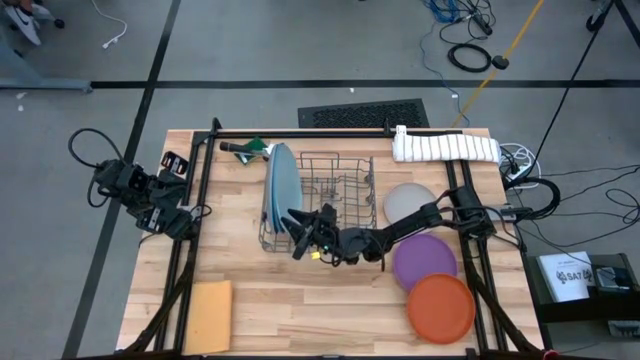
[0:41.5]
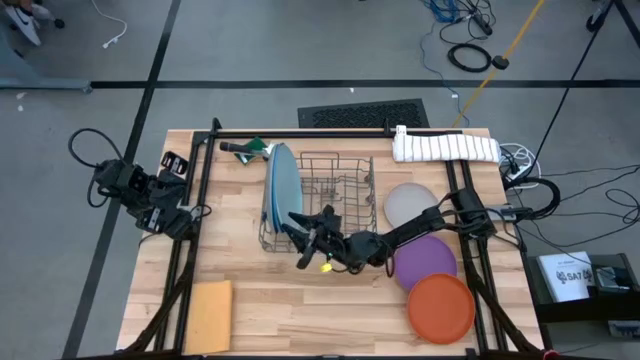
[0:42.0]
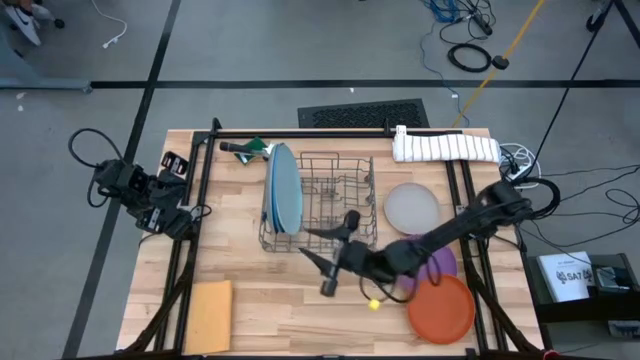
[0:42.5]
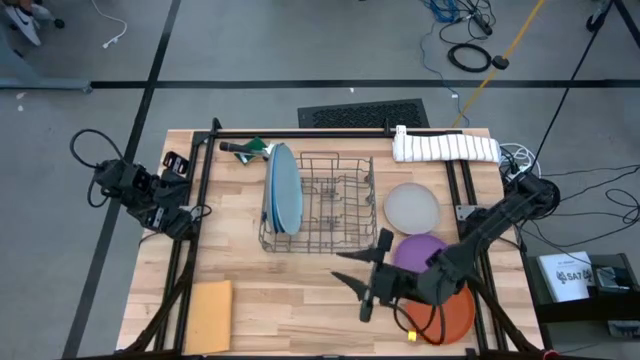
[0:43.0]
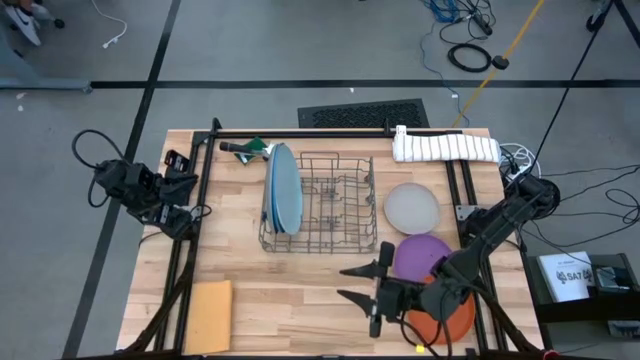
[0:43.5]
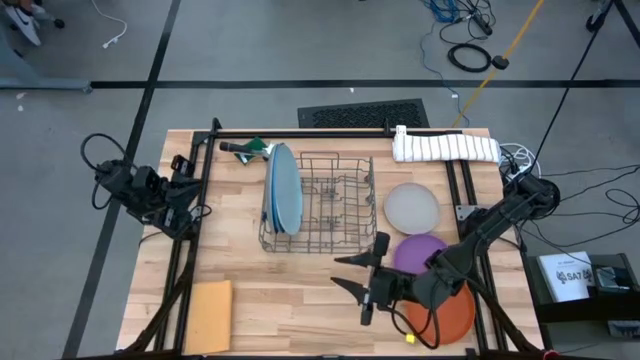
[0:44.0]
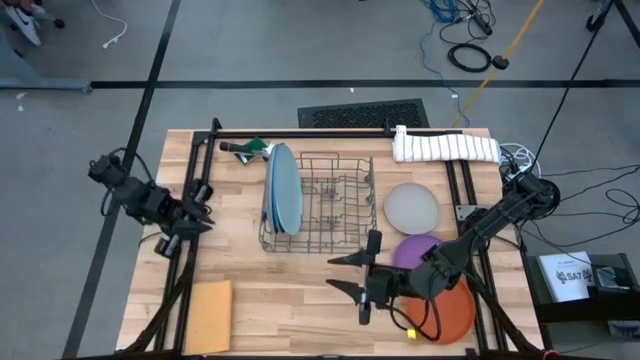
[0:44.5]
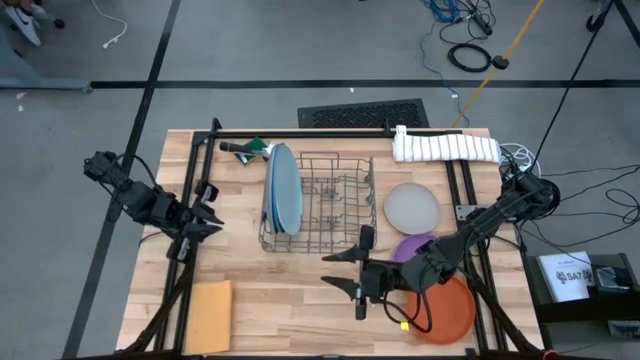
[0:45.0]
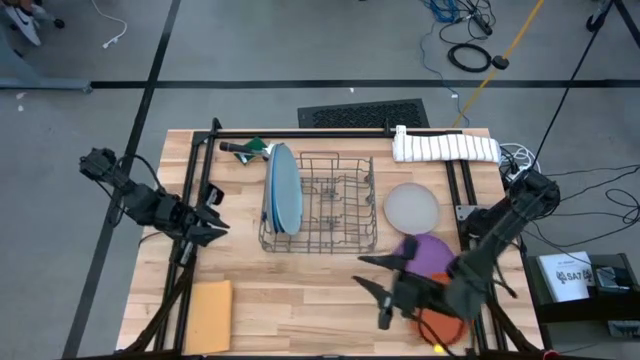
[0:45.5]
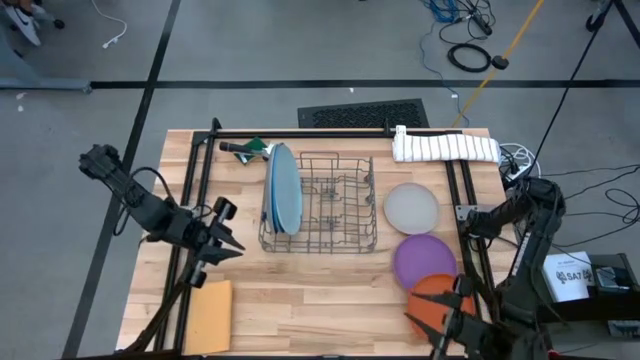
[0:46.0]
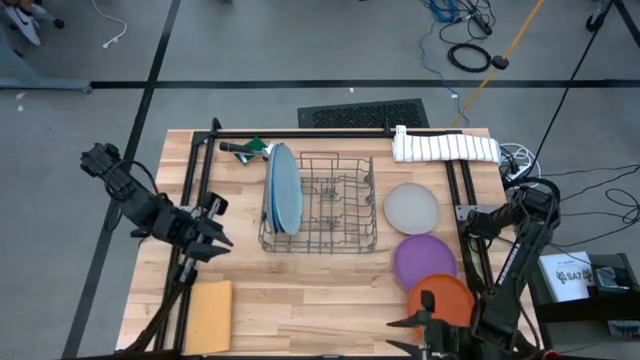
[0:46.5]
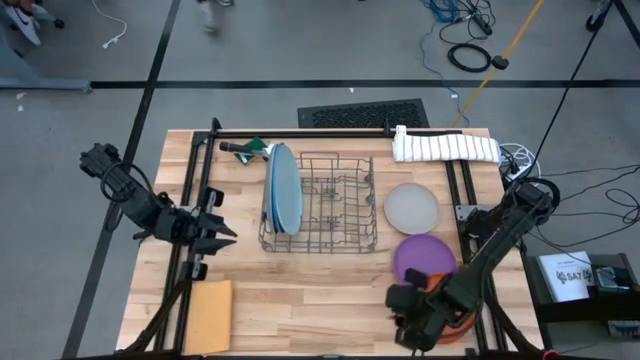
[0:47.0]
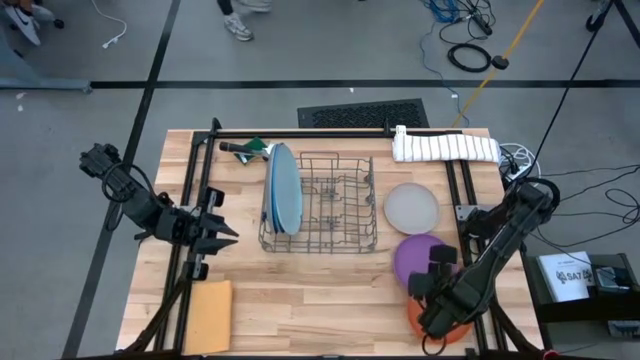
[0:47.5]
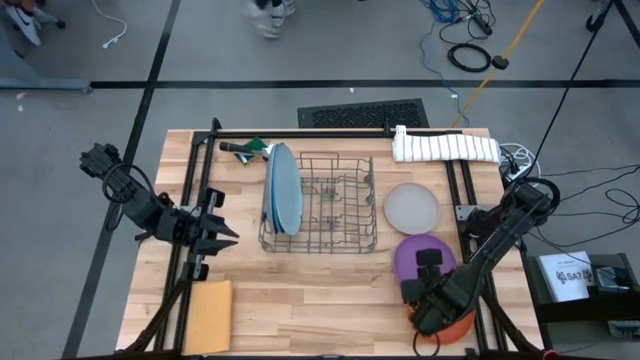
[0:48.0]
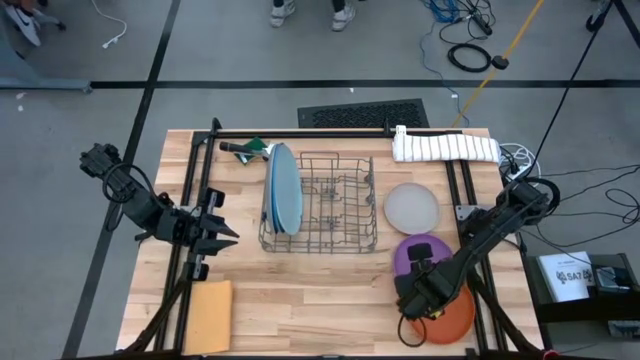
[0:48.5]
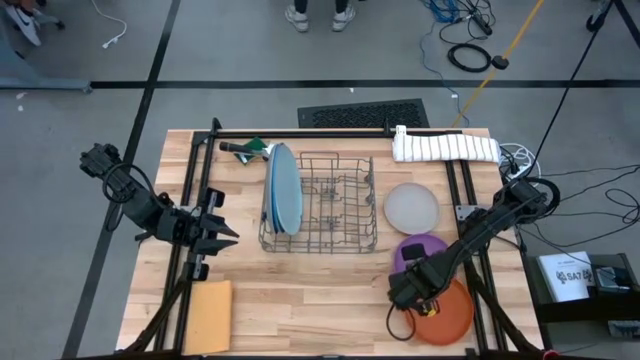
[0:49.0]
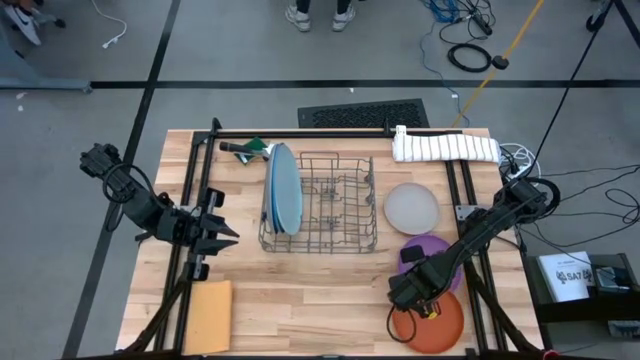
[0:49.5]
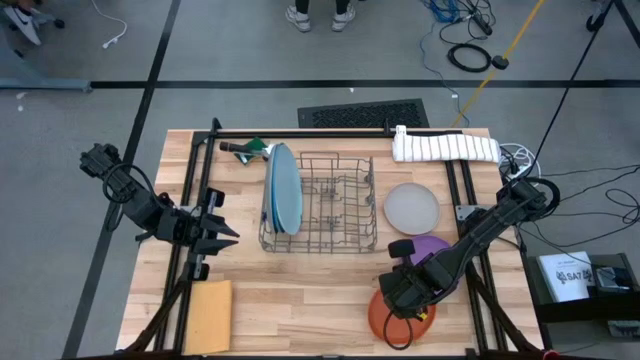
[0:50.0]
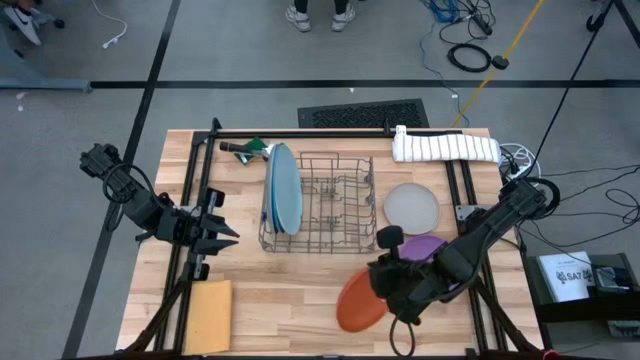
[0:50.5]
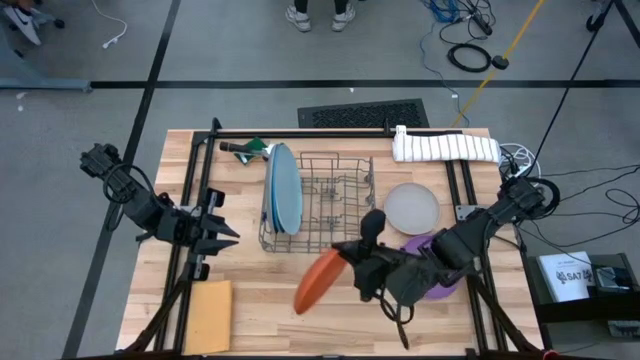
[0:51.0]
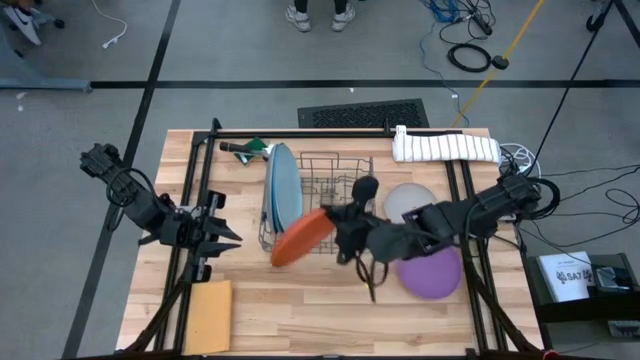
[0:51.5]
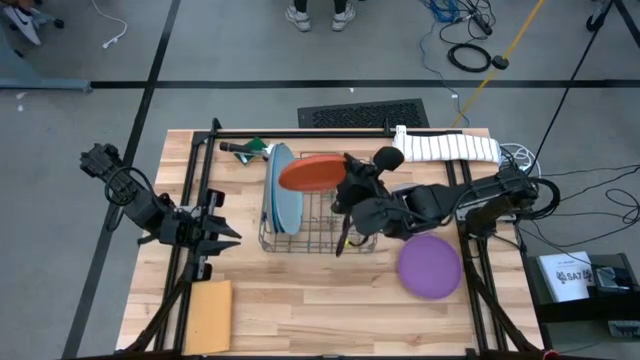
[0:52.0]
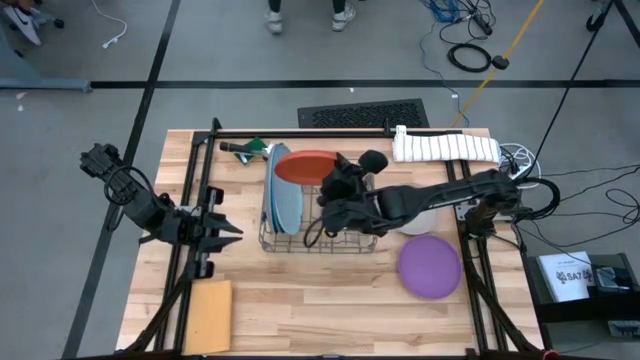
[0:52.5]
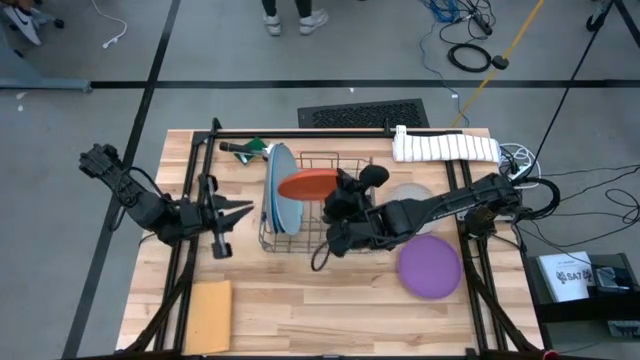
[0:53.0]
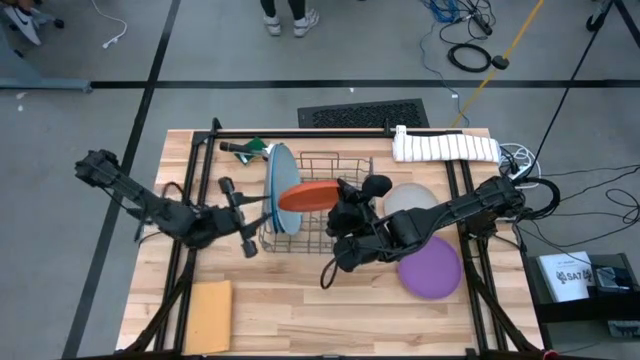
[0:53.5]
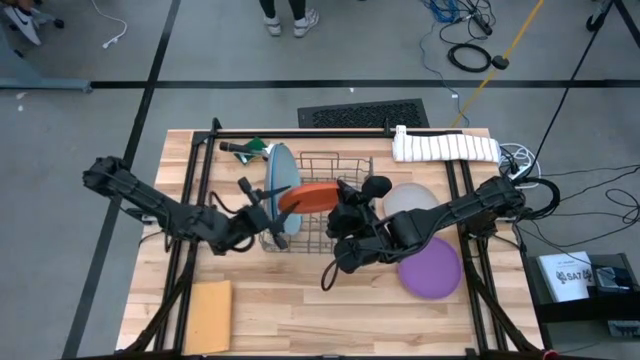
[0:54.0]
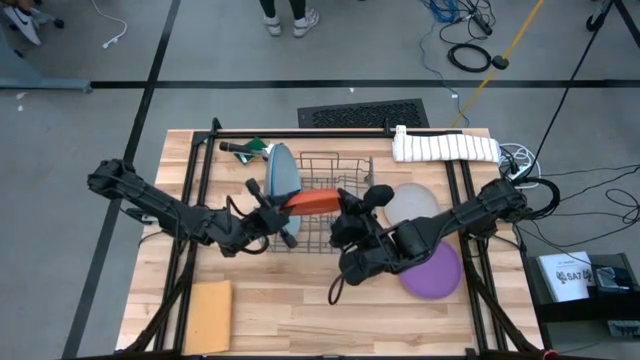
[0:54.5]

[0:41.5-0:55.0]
Task: Sort dishes
Put the orange plate into the green dish rack
